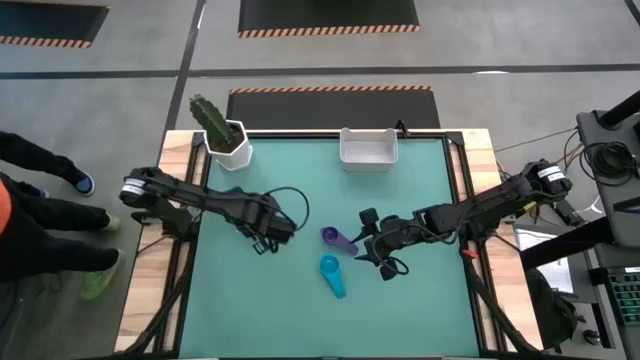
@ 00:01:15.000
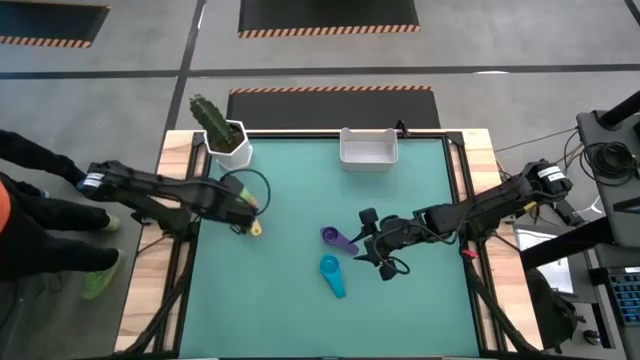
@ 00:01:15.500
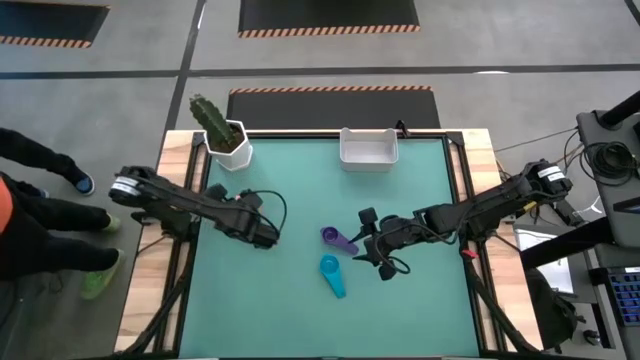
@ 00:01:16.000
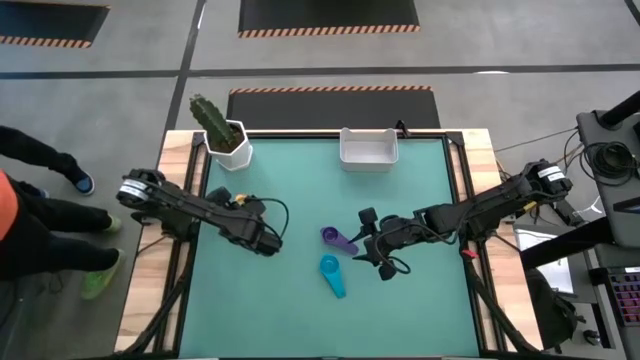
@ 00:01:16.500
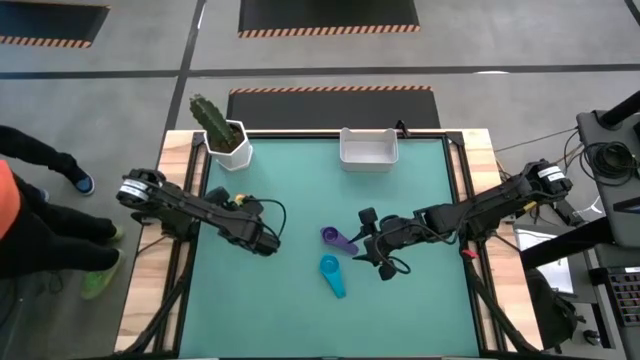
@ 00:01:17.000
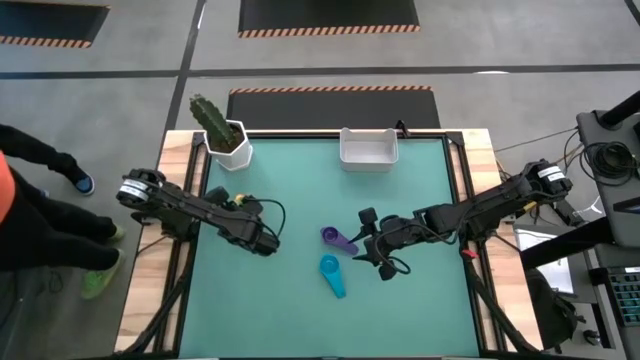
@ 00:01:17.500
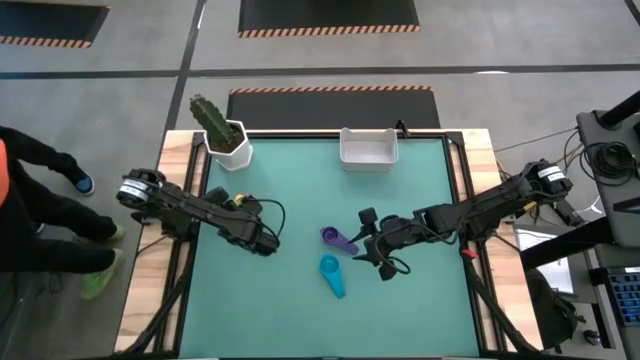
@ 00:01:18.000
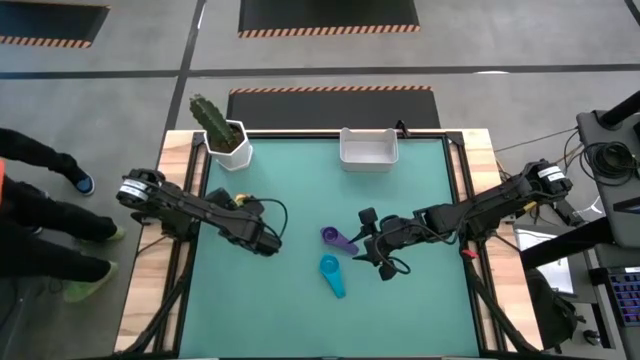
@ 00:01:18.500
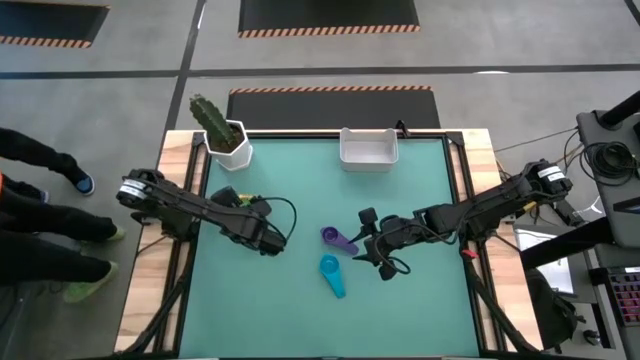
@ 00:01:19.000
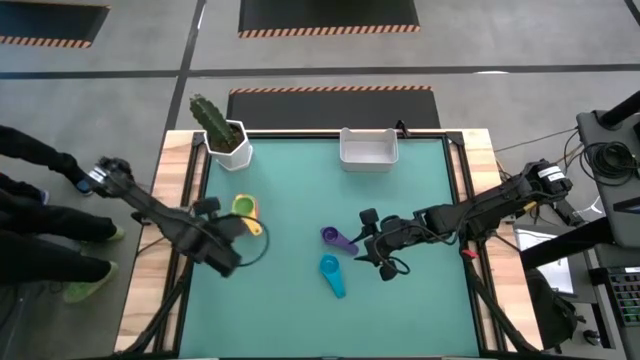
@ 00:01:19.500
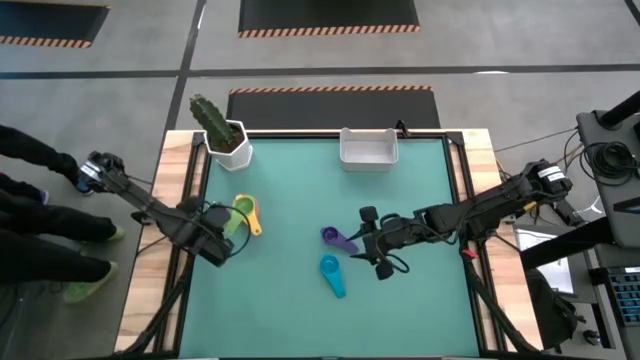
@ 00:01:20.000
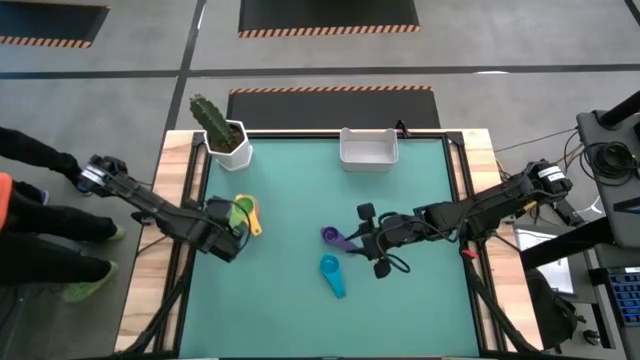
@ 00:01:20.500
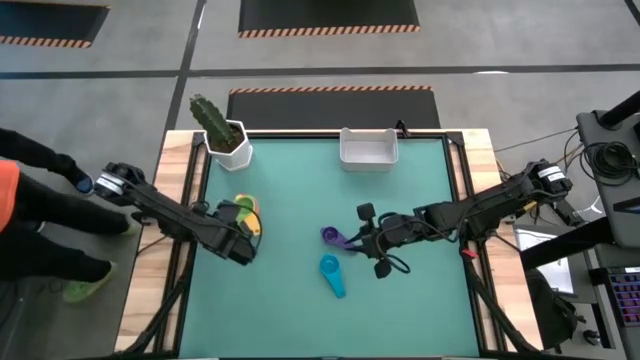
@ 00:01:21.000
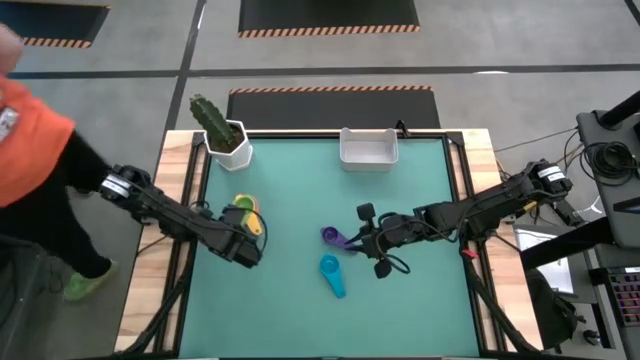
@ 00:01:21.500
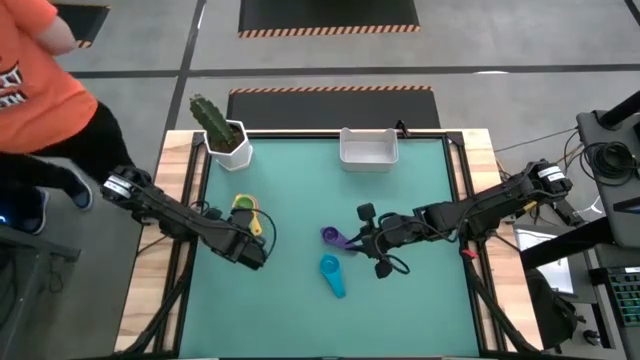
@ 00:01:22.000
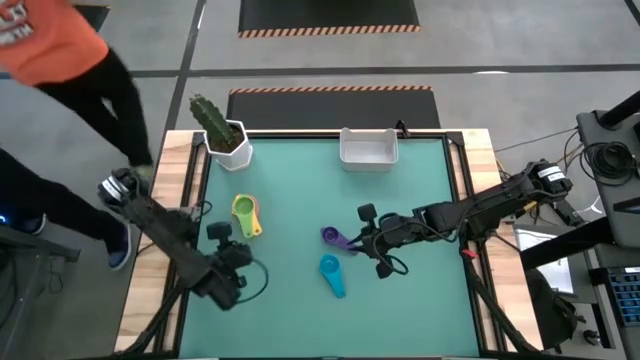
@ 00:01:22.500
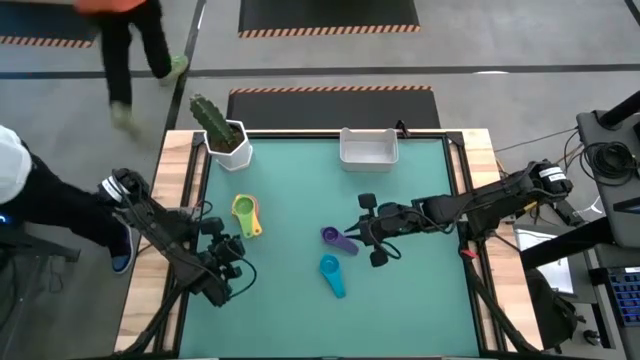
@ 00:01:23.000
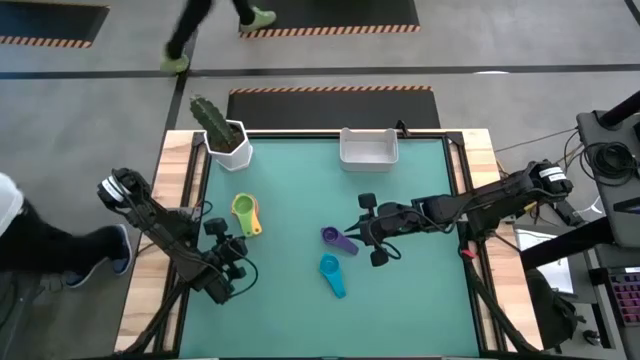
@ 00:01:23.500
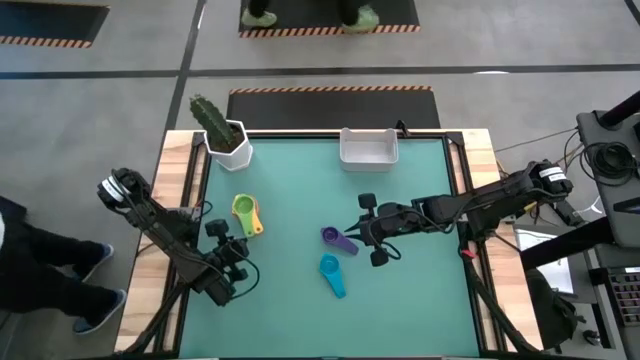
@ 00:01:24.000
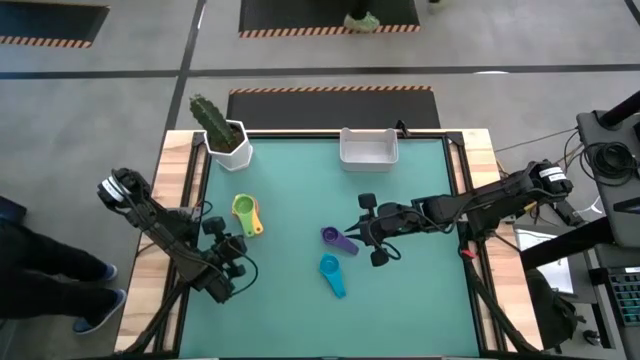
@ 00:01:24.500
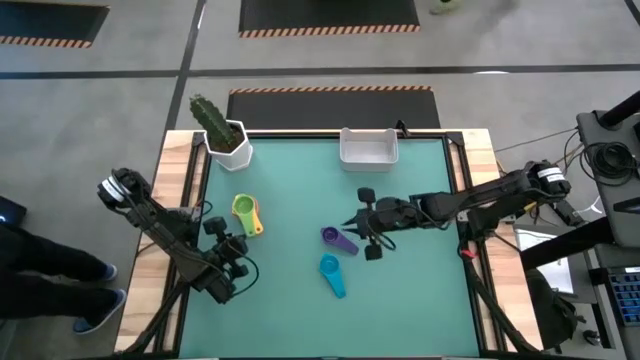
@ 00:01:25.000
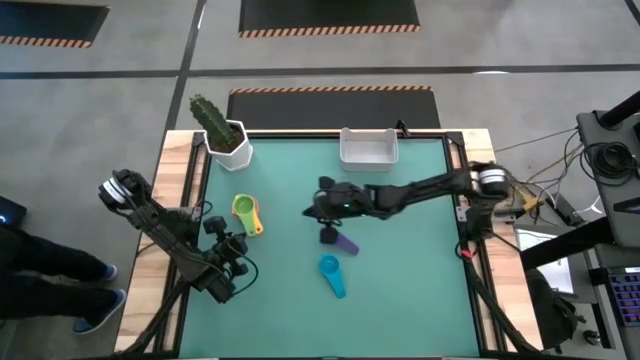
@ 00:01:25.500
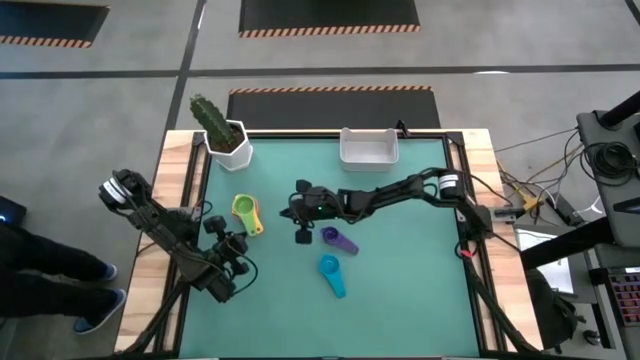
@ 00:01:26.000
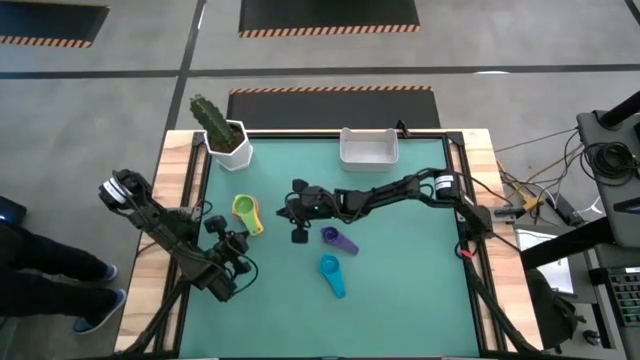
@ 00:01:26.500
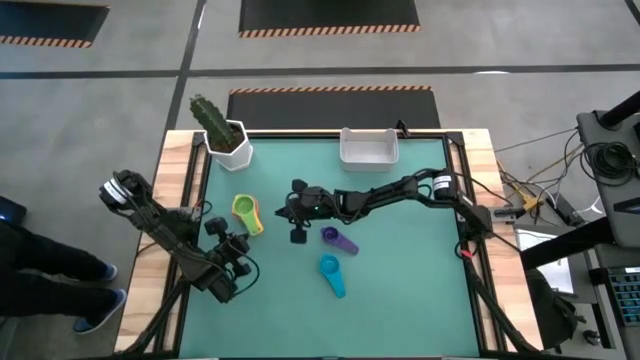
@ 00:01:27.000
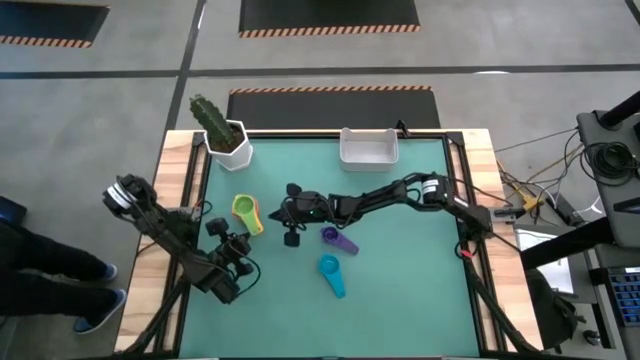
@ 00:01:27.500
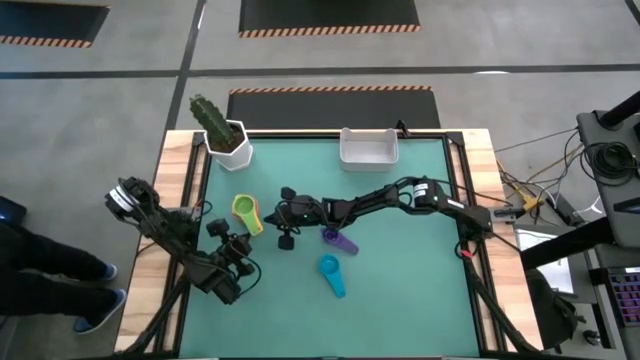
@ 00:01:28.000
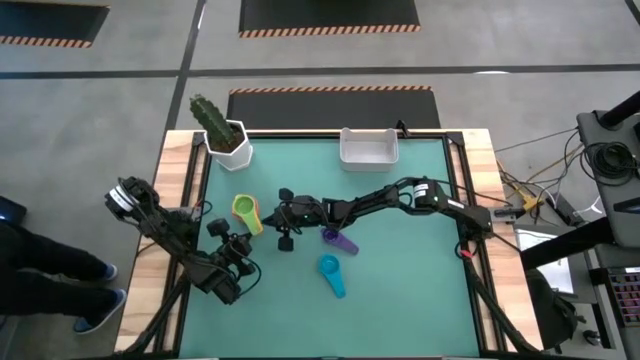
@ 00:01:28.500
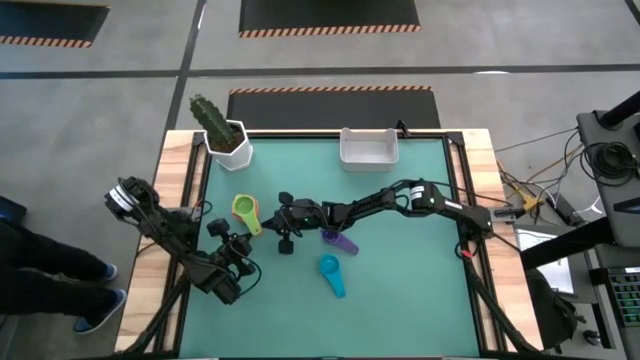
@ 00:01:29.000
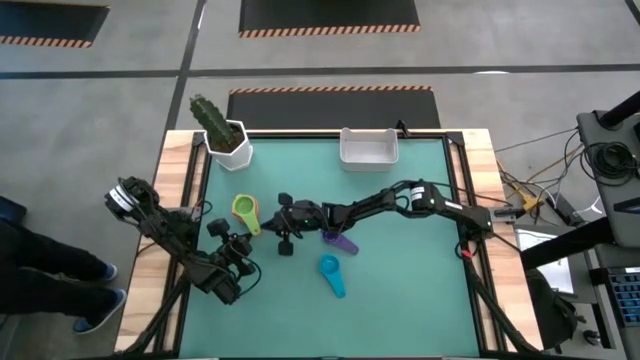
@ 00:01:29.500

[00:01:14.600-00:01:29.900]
Task: Nest measuring cups in basket
Stack the green measuring cup on top of the yellow measuring cup

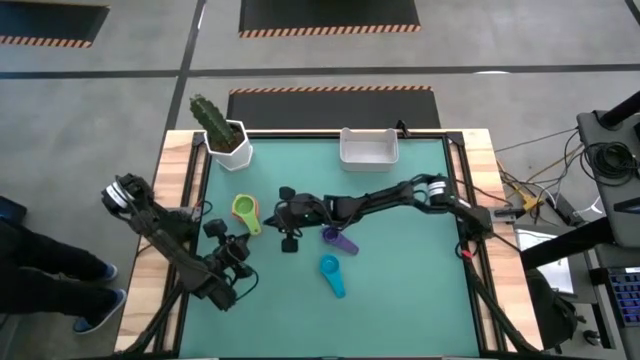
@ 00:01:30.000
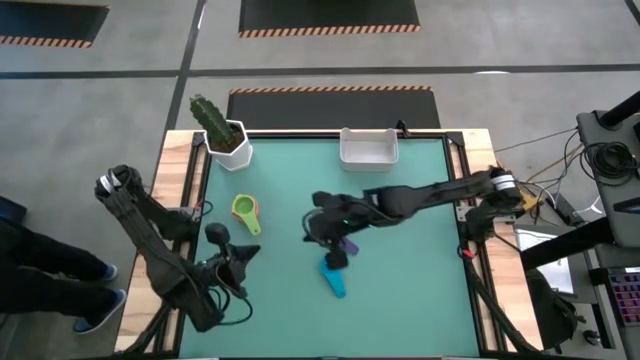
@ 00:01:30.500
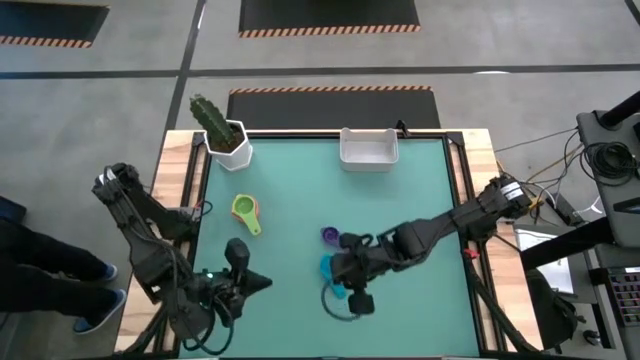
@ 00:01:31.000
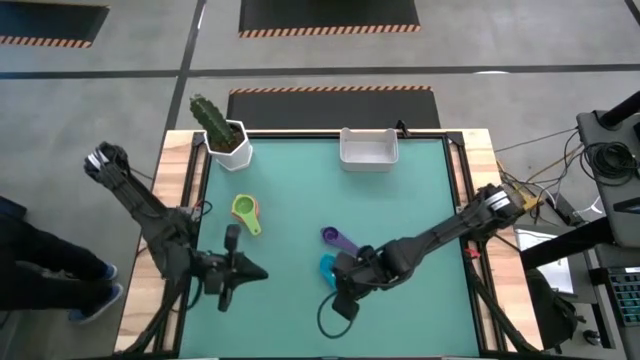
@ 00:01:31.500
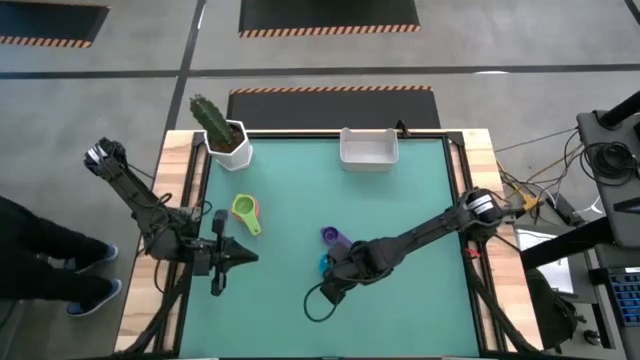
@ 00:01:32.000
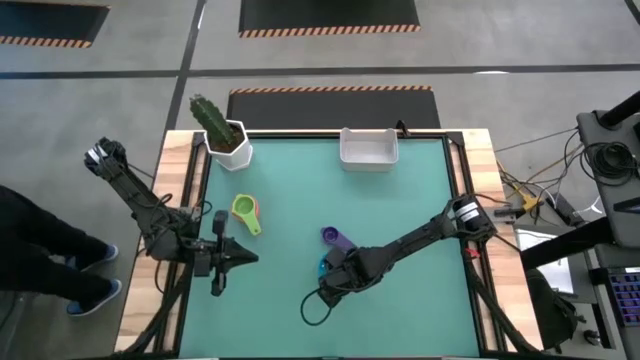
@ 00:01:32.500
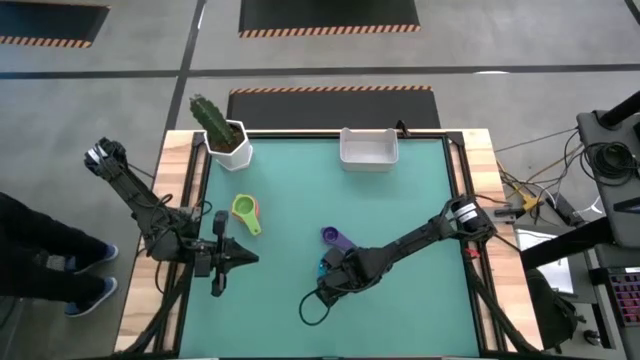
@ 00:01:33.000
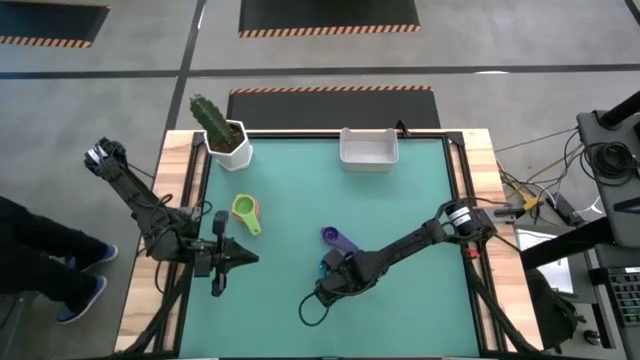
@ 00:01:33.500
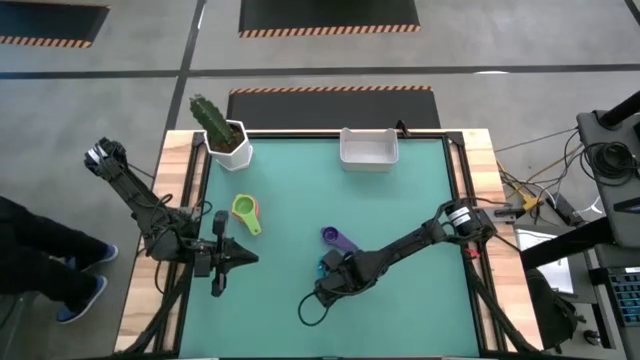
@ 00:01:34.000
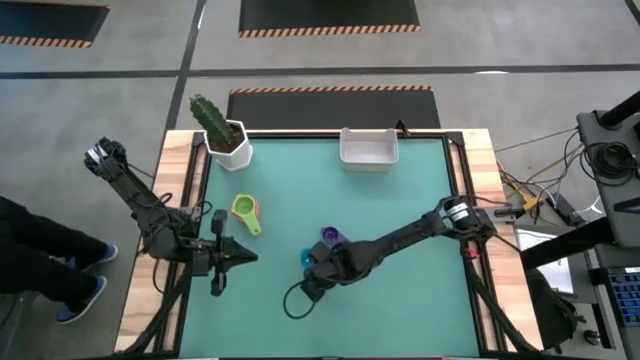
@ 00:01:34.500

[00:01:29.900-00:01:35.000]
Stack the light blue measuring cup on top of the green measuring cup
